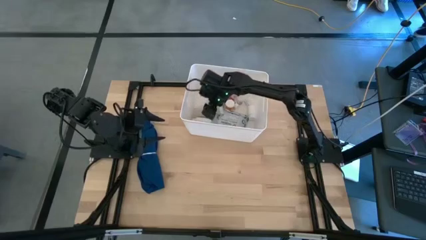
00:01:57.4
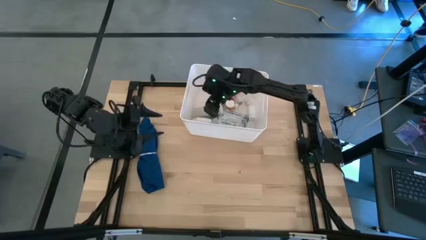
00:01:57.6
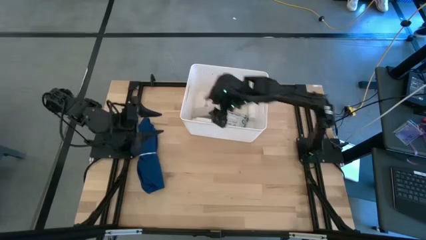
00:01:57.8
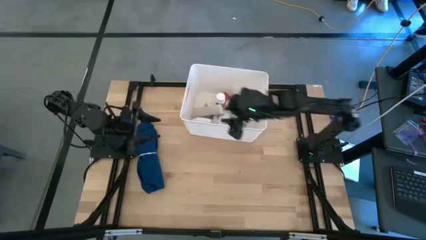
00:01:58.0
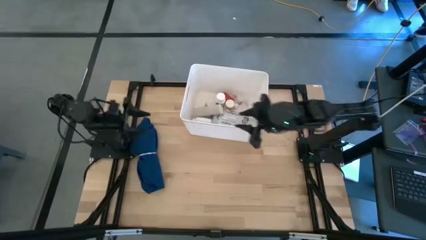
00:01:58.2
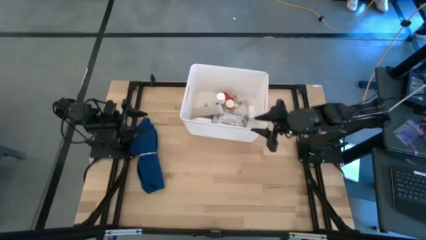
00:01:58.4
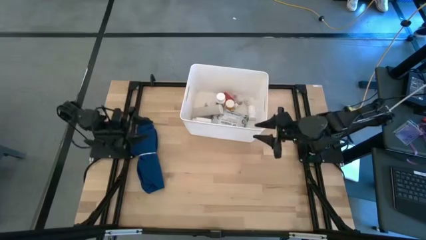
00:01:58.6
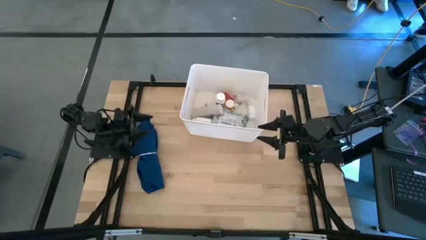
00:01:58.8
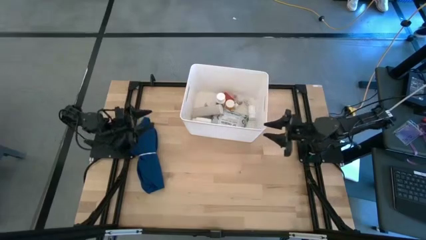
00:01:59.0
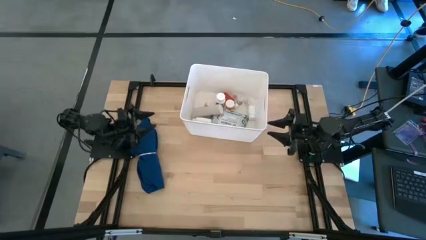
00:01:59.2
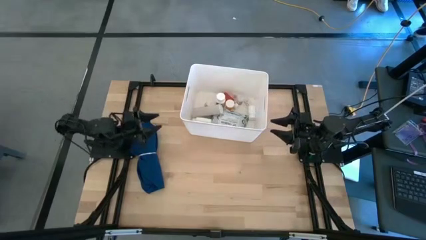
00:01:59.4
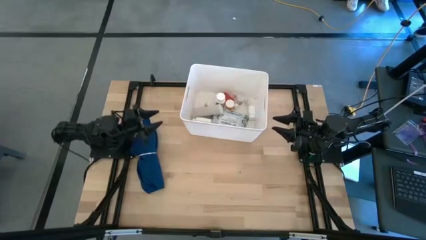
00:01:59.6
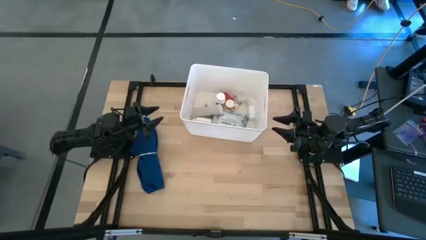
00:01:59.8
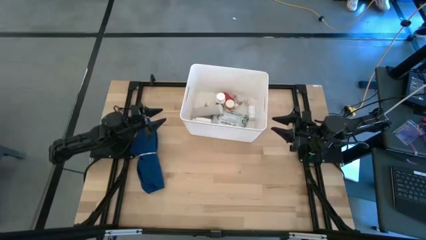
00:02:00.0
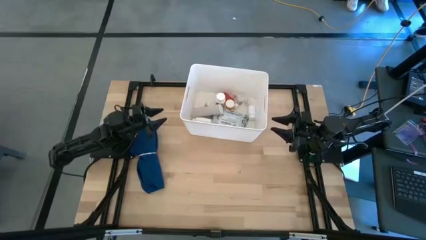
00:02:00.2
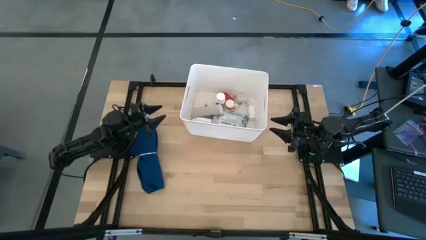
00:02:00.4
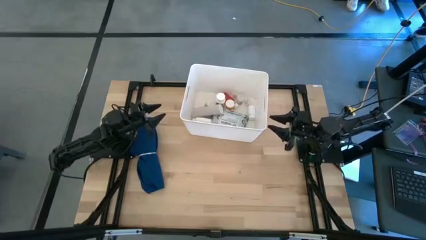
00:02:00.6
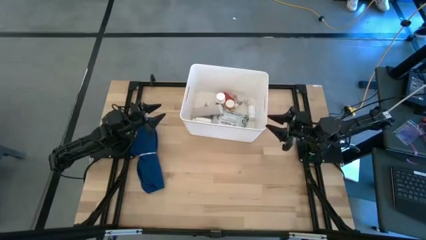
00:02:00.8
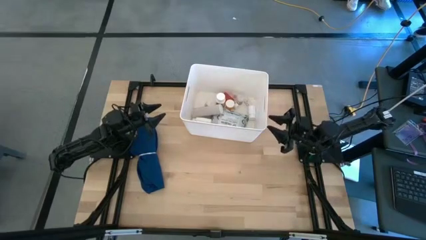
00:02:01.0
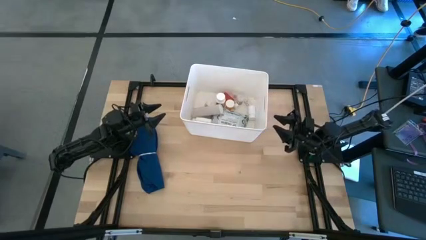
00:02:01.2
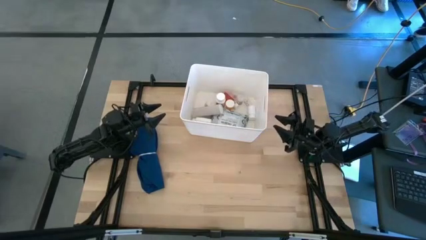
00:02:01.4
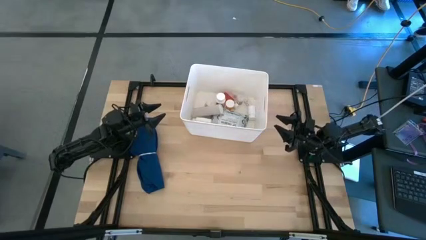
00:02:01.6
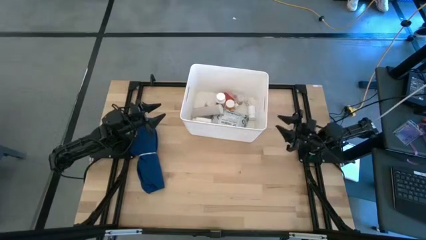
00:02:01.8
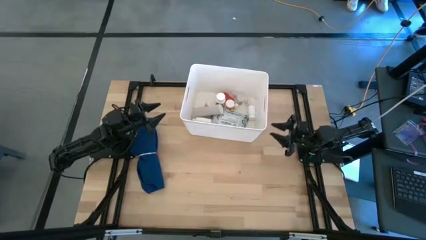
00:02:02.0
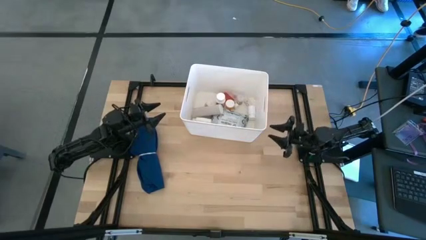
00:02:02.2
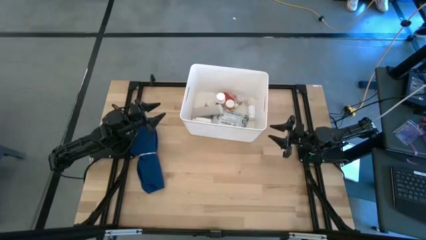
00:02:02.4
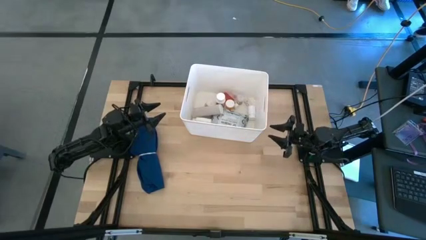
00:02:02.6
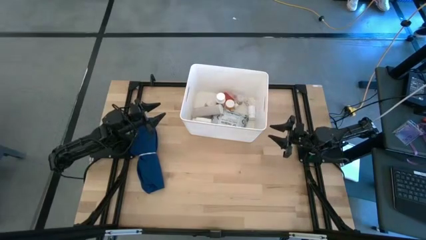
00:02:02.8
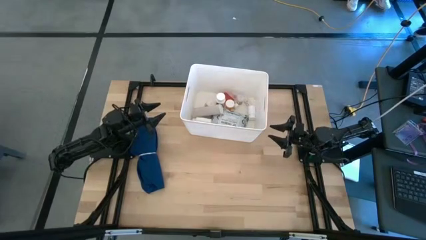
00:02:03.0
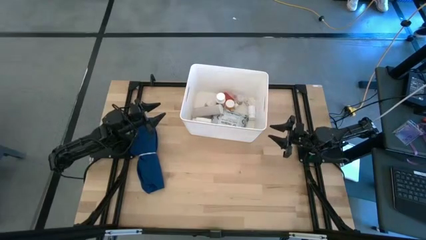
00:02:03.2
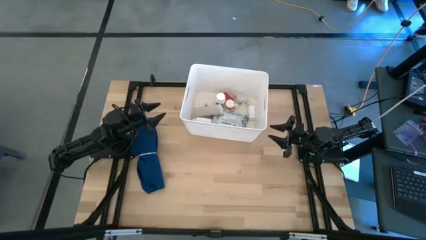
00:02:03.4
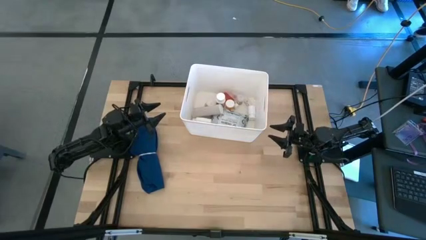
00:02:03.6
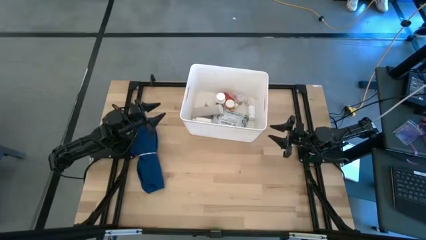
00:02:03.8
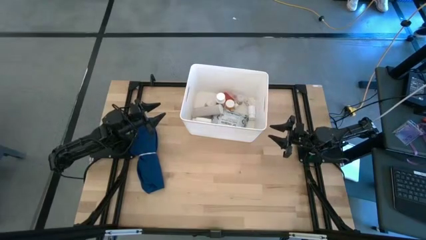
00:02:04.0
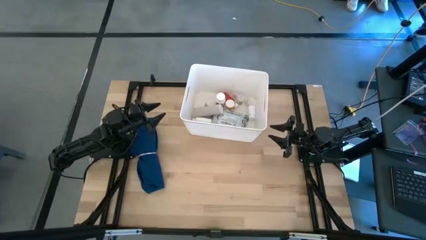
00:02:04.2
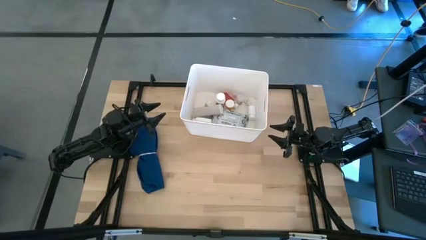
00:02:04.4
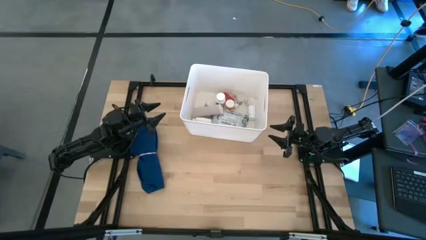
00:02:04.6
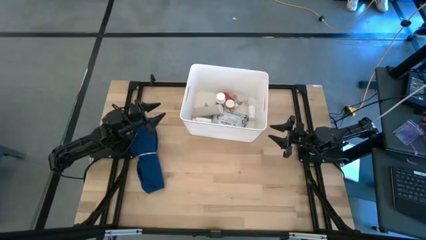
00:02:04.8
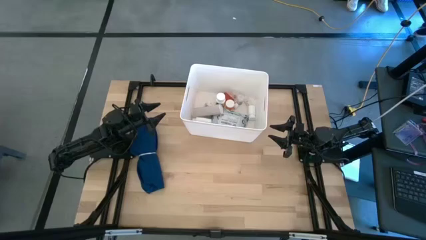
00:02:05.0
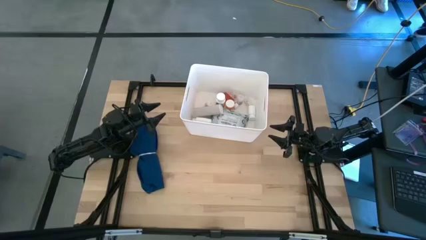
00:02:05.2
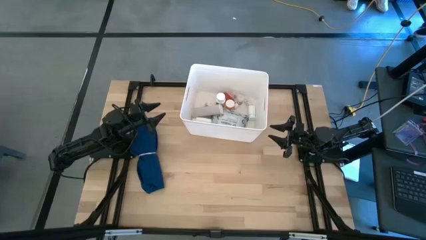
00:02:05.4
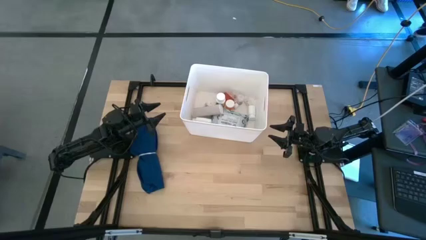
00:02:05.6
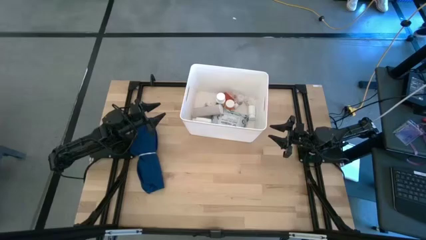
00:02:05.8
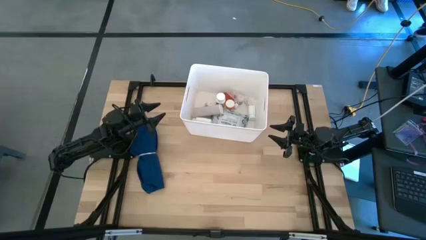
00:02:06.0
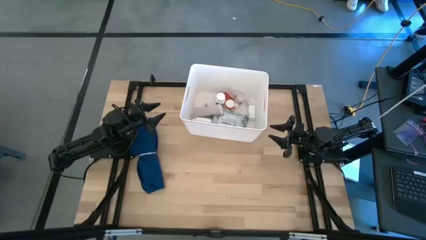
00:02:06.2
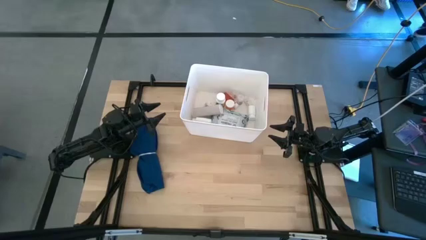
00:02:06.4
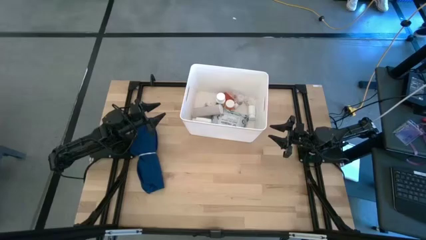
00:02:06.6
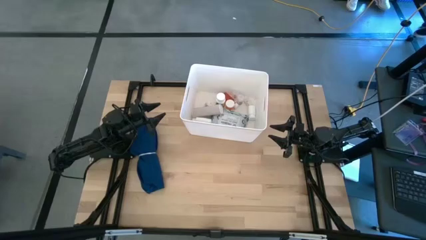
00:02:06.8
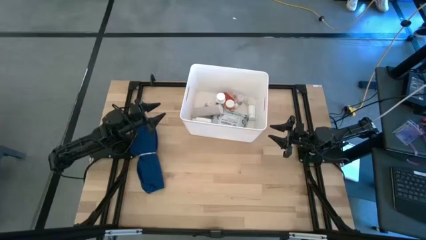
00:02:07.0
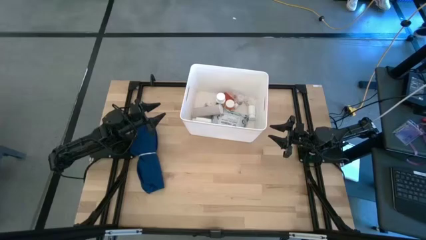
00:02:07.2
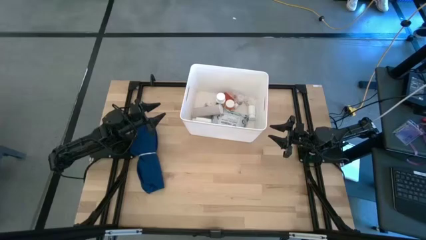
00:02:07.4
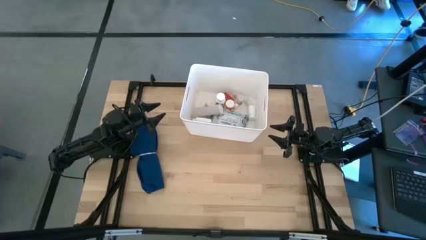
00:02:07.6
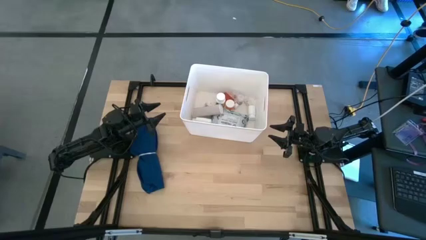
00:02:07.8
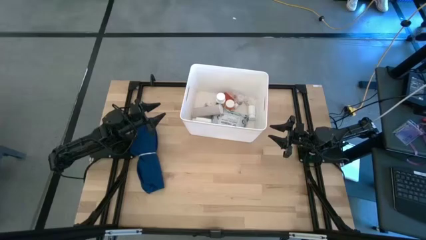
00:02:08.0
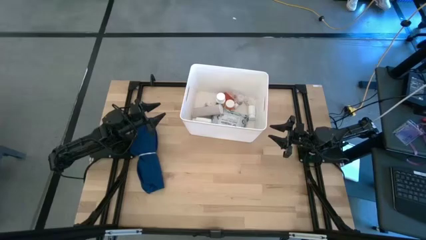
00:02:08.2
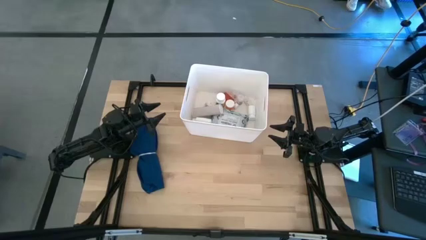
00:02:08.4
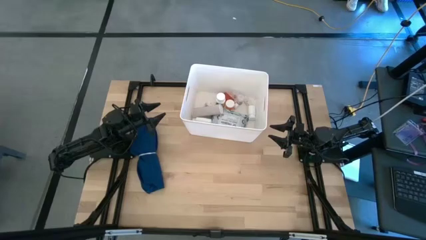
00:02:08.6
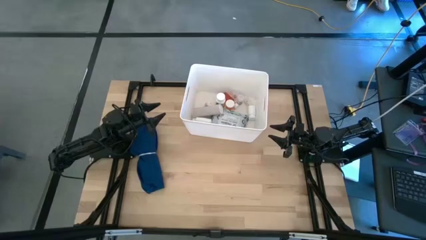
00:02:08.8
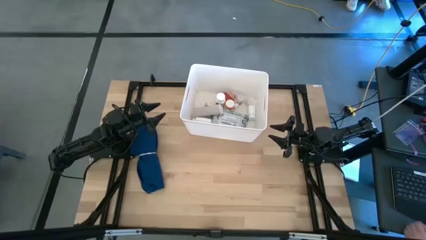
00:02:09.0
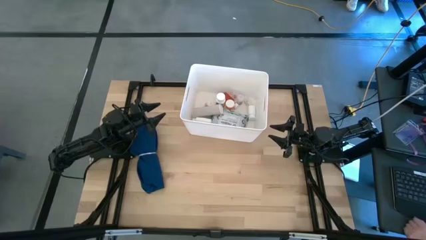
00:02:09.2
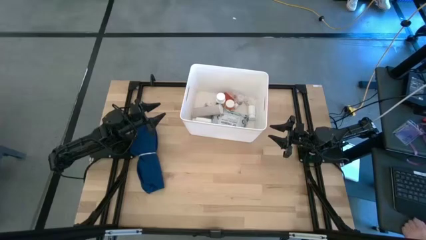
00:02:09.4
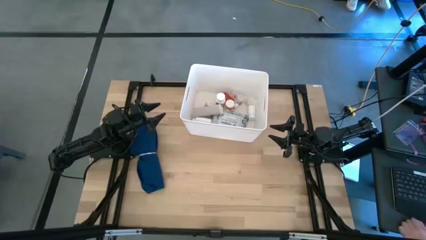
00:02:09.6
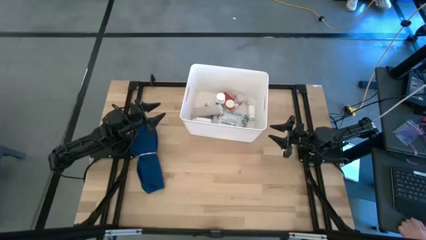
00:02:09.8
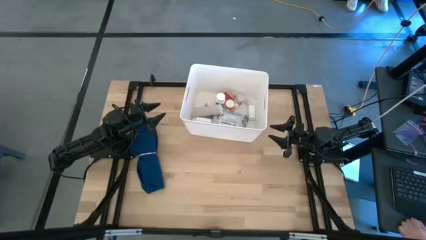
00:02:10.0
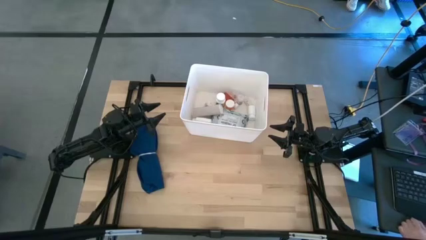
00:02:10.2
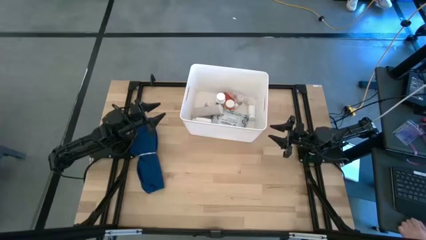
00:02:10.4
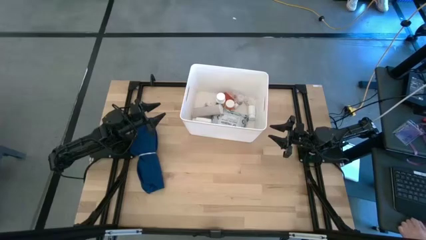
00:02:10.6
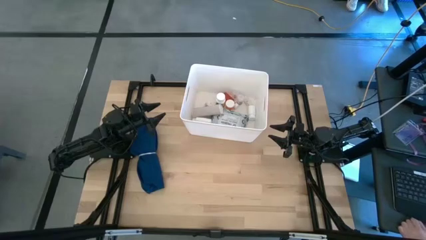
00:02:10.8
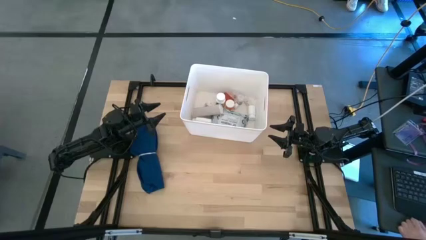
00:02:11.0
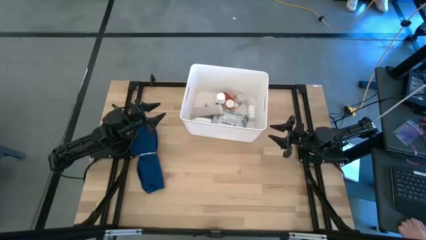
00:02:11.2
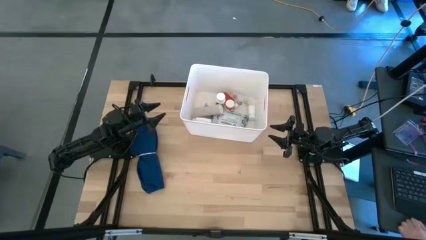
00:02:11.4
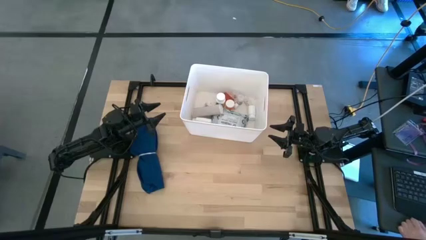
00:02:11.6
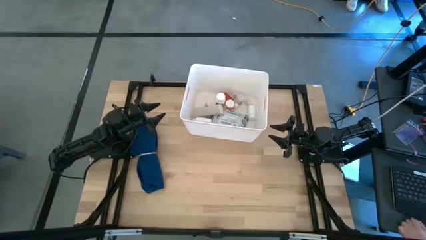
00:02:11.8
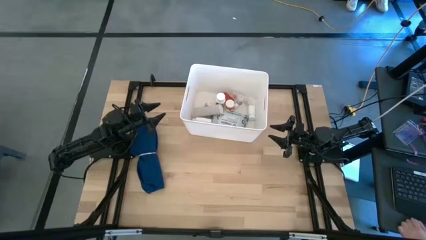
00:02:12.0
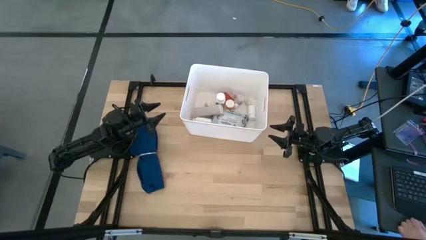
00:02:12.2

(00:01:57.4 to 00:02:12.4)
Task: Pick & place medical supplies in basket/bin
Return to Home Position

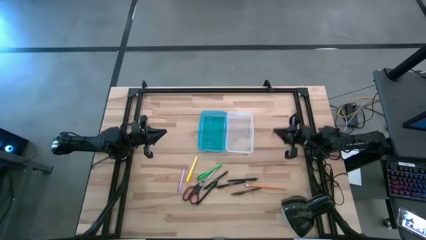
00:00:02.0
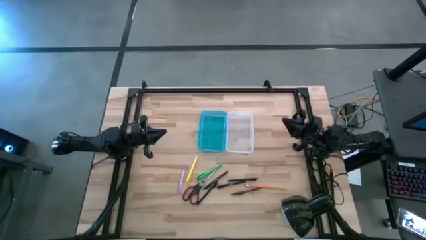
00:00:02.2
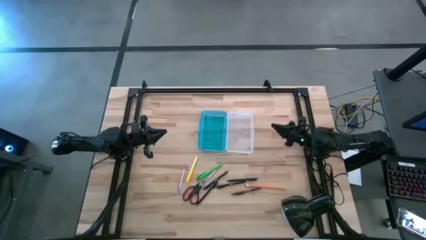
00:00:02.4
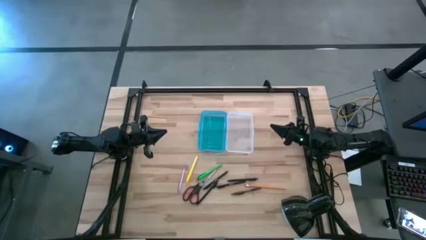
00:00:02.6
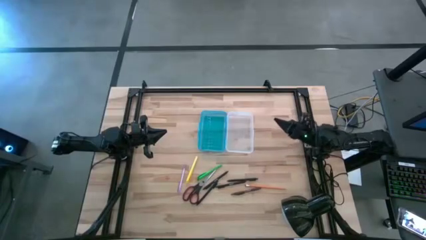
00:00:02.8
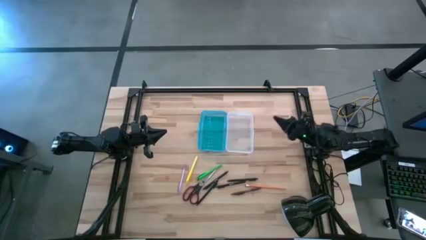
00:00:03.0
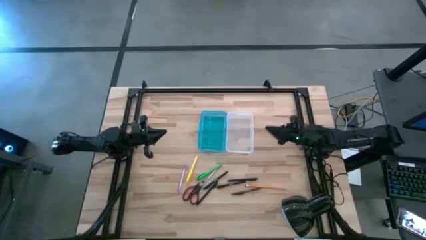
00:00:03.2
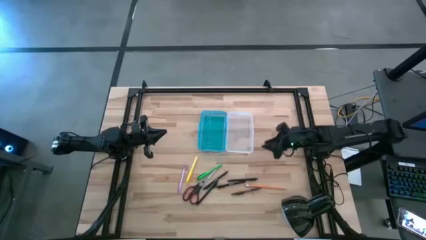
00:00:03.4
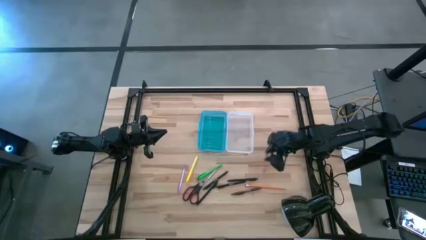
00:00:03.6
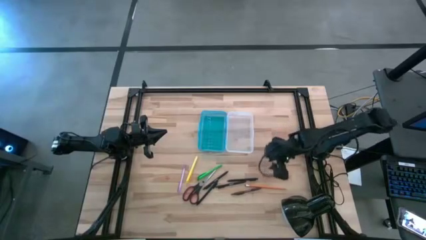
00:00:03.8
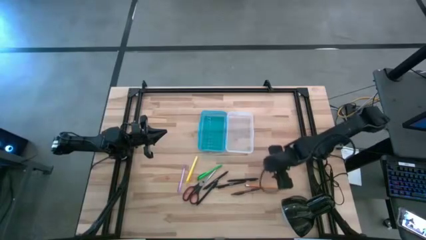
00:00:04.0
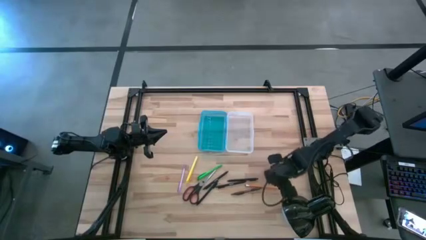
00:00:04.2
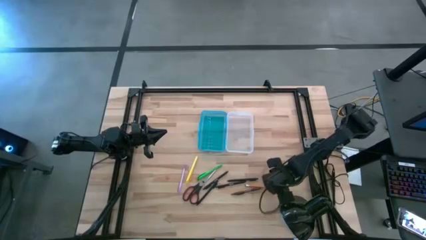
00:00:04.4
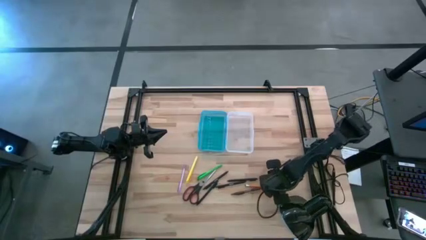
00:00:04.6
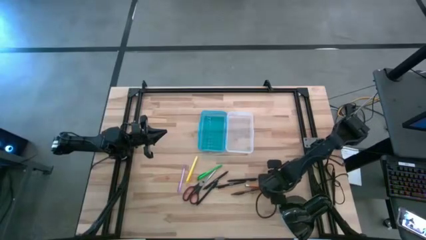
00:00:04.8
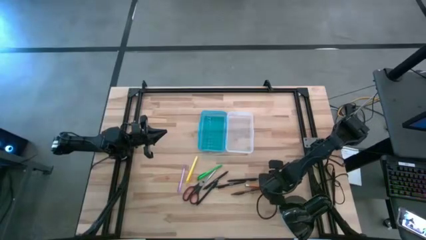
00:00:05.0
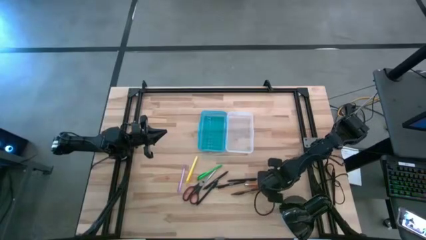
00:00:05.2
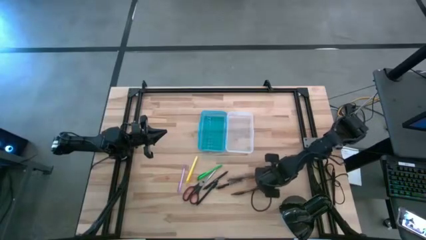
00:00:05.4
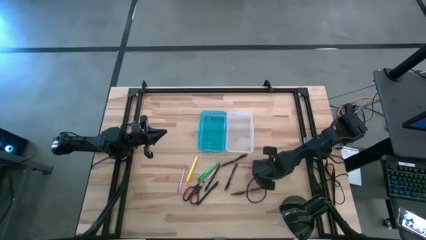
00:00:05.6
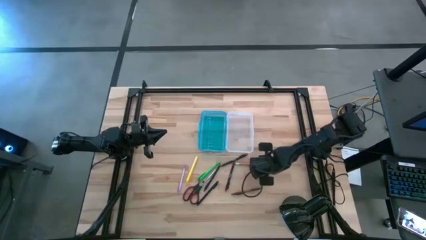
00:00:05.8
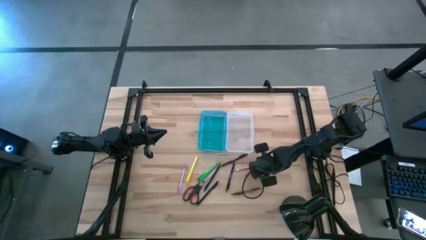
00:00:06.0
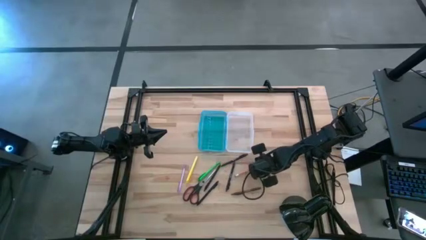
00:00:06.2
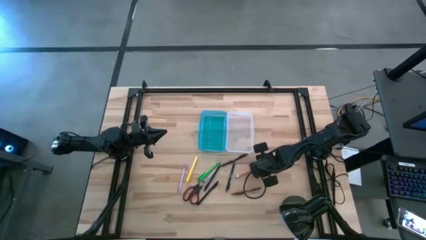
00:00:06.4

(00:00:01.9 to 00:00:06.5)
Task: Pick & place school supplies into a supply box
Move the yellow pencil
